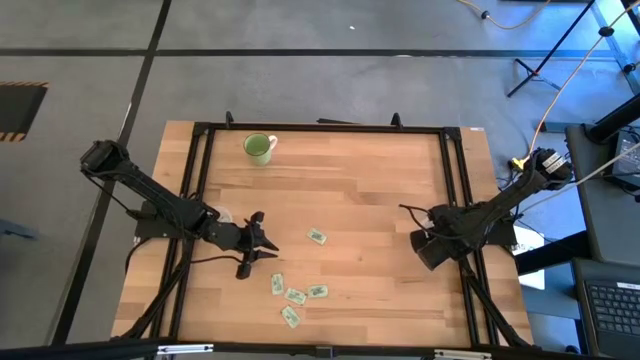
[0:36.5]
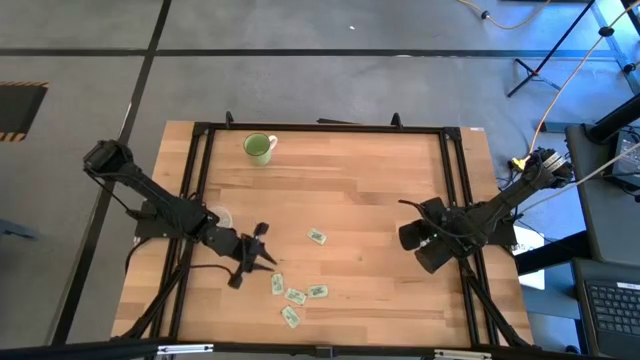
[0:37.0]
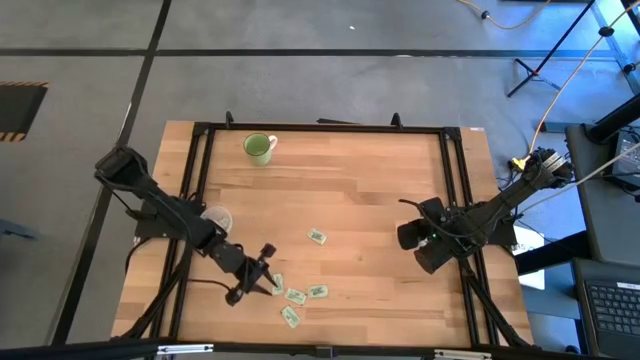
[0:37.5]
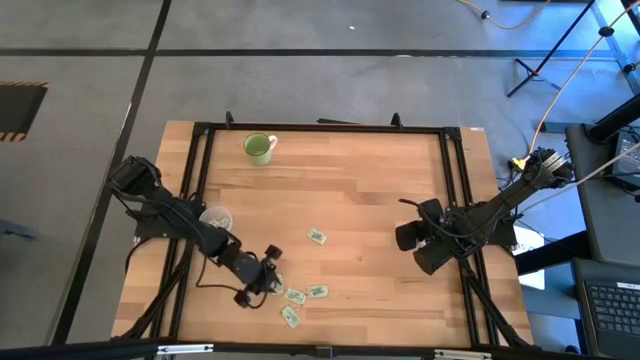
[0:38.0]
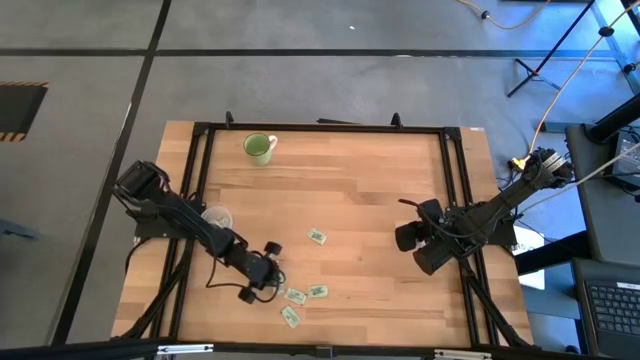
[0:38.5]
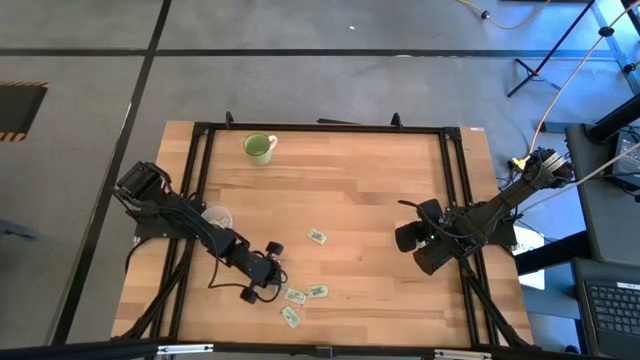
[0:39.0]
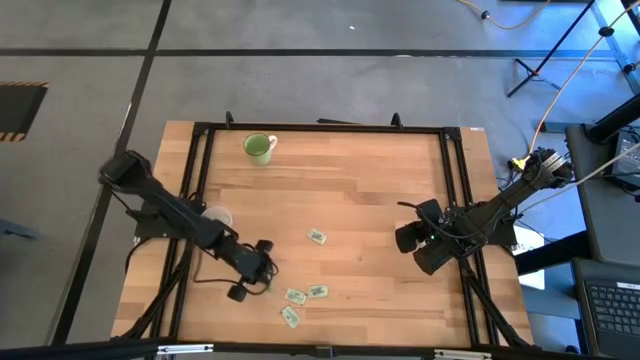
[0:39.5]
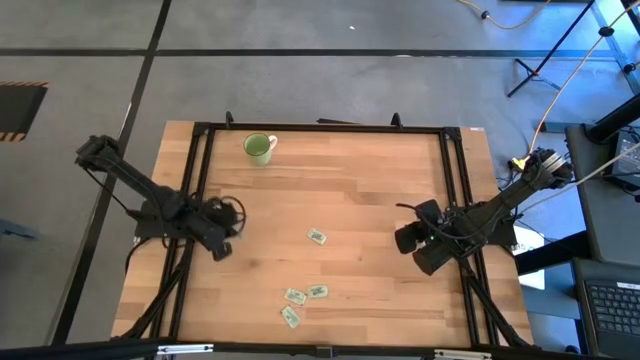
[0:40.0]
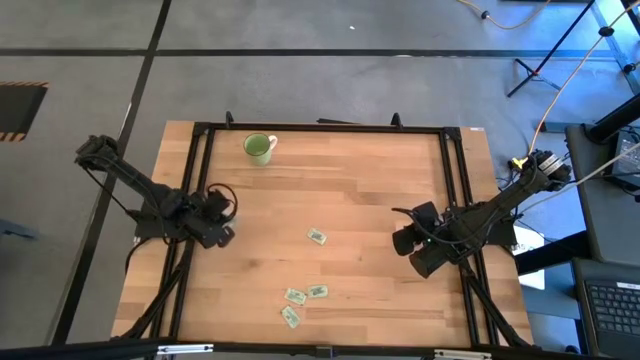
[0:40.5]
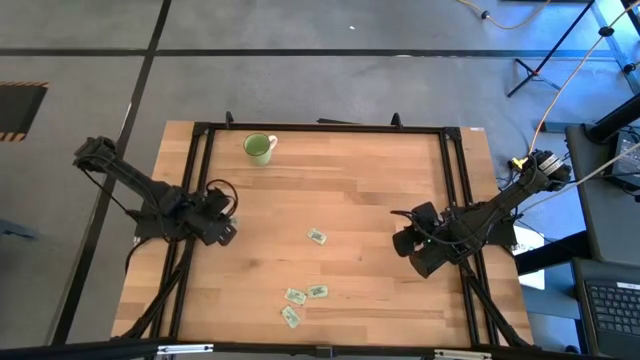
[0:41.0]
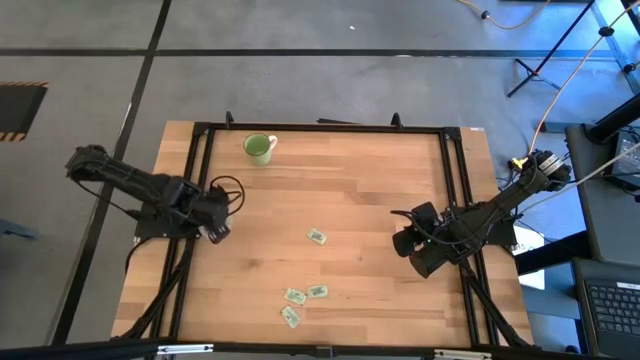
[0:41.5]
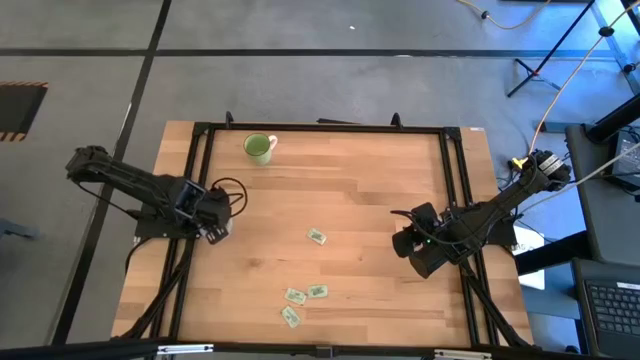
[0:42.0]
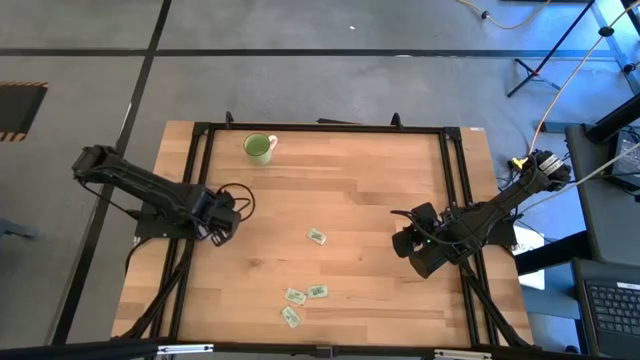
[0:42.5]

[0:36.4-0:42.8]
Task: Pick and place items into bin
Put the white stevia packet into the left transparent bin

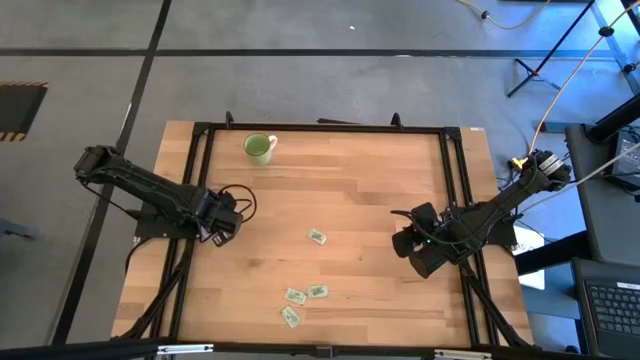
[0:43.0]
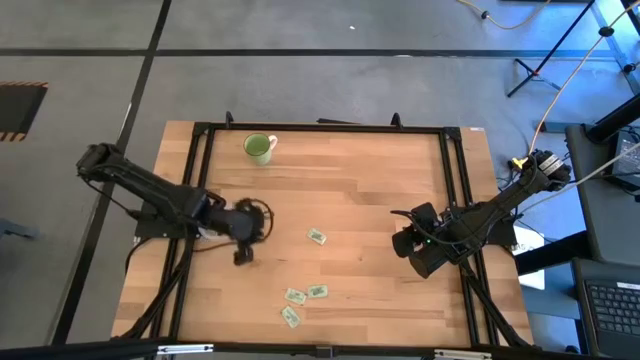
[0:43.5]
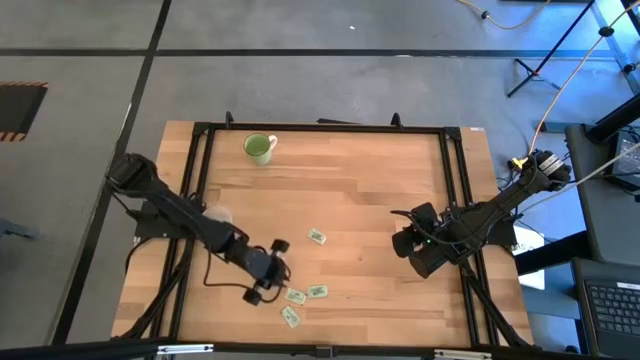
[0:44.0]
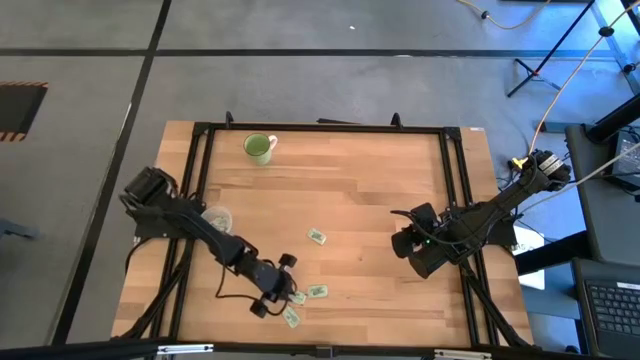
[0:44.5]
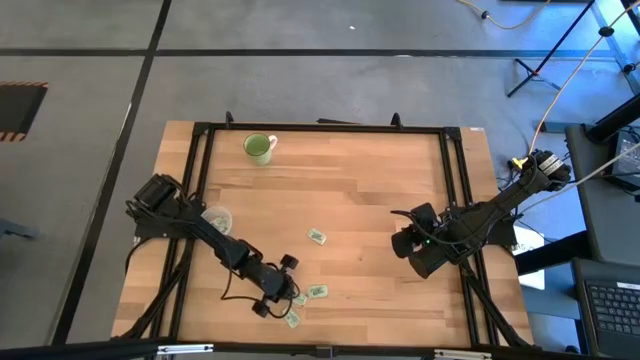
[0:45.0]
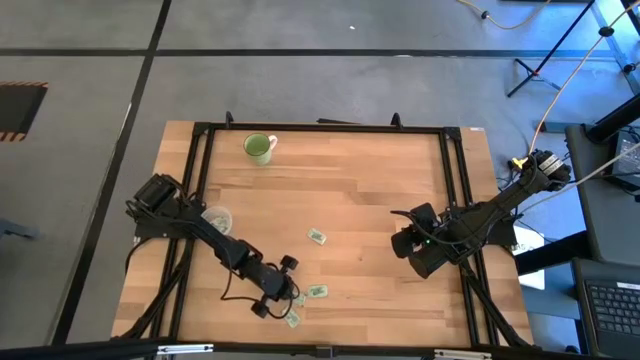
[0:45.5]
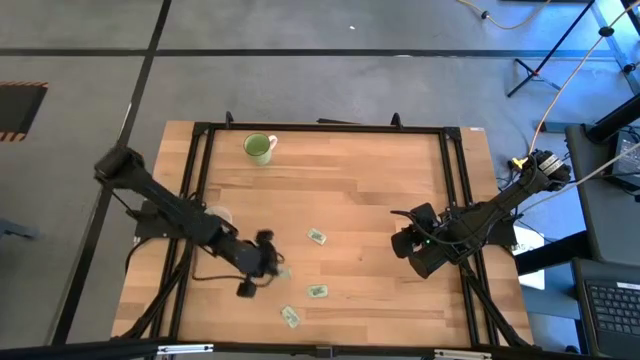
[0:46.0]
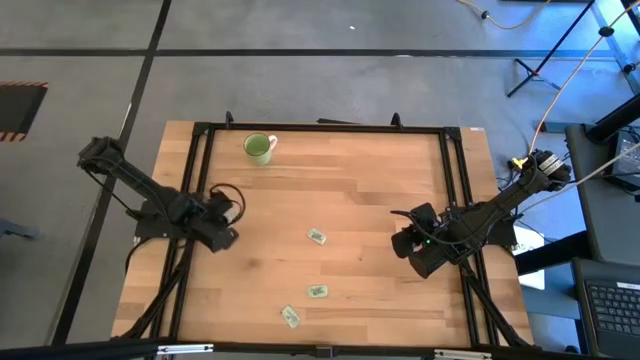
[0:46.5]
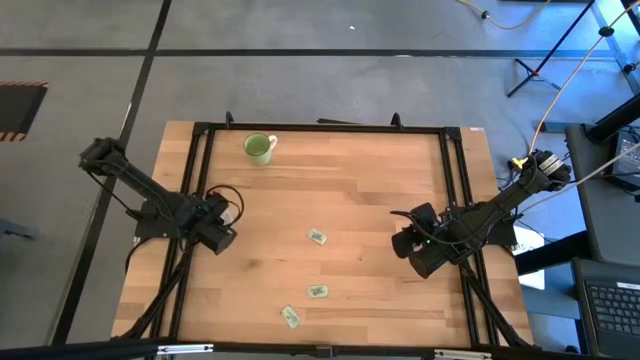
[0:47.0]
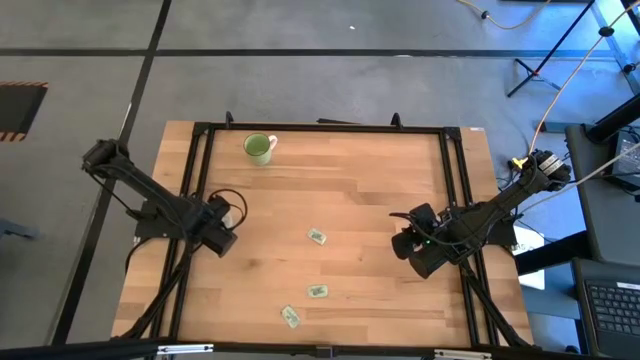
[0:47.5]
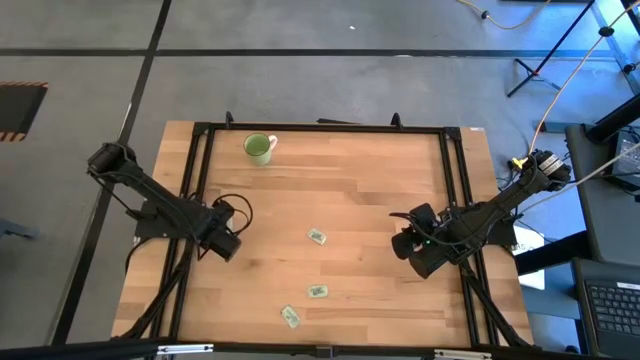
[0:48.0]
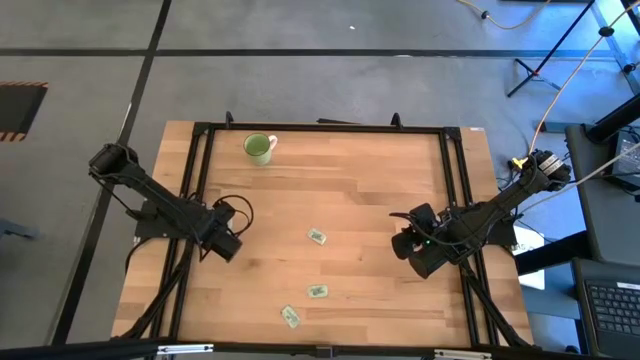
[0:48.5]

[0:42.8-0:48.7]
Put the white stevia packet into the left transparent bin

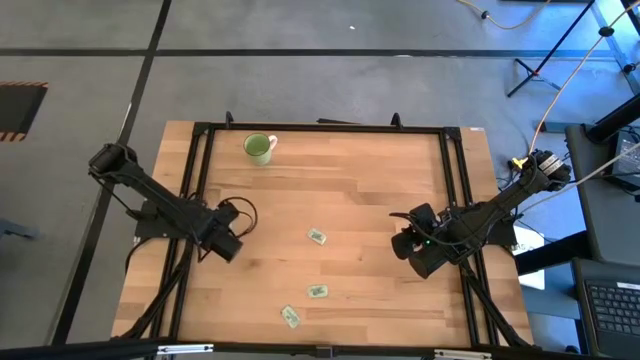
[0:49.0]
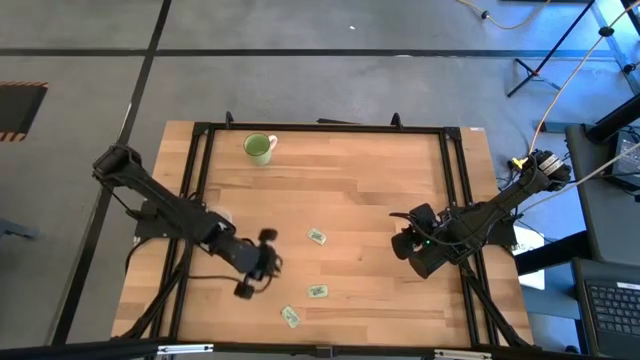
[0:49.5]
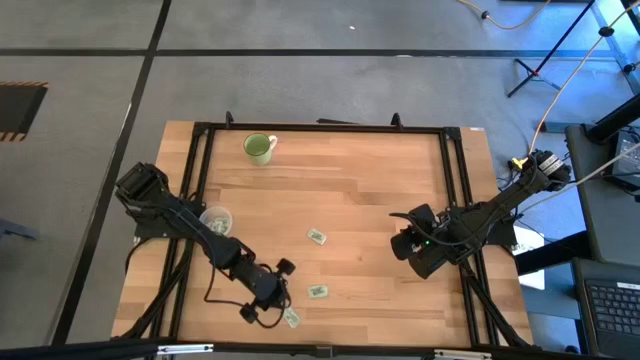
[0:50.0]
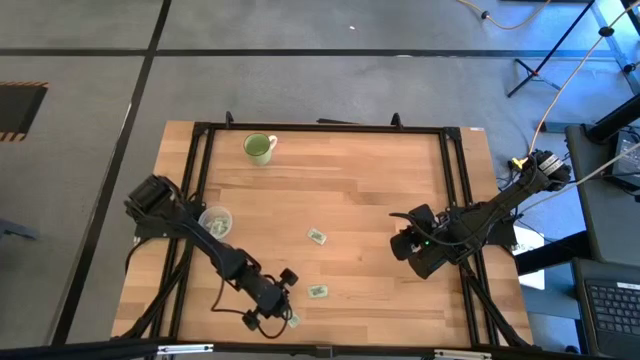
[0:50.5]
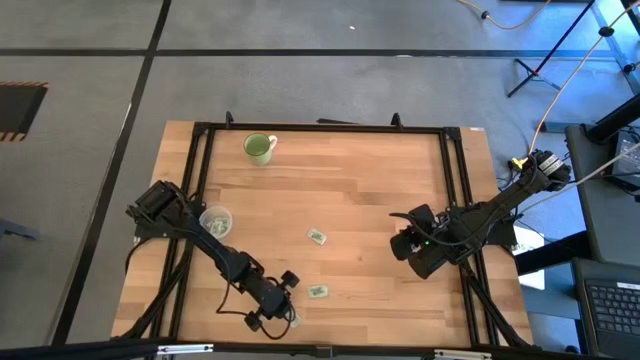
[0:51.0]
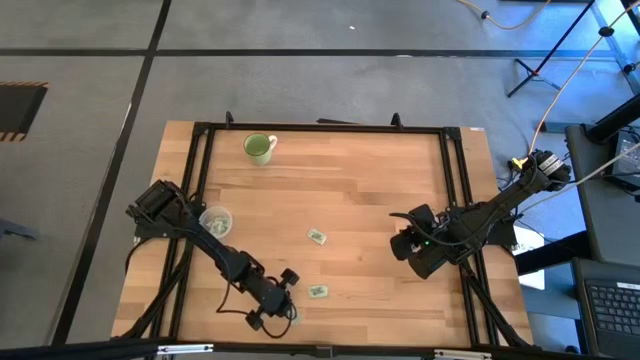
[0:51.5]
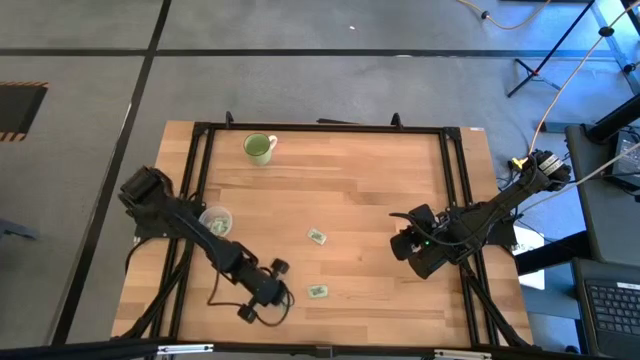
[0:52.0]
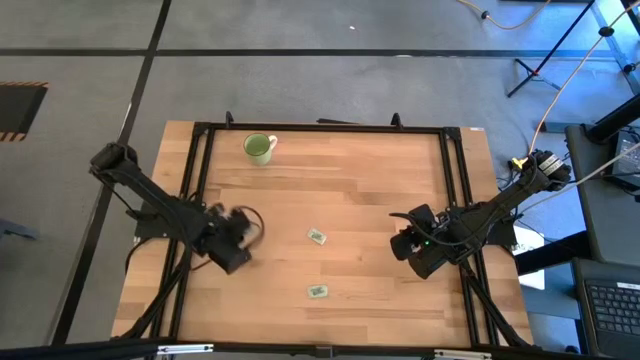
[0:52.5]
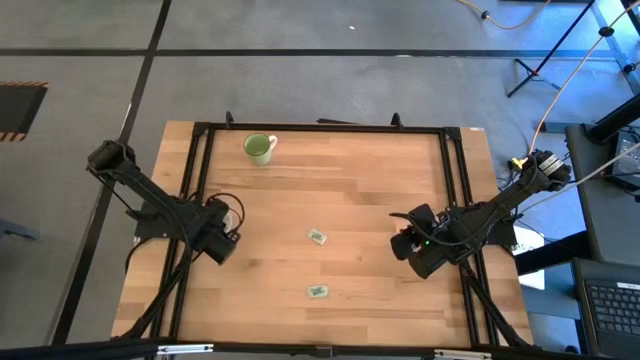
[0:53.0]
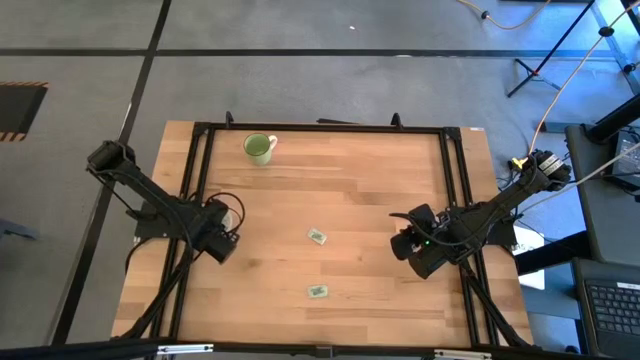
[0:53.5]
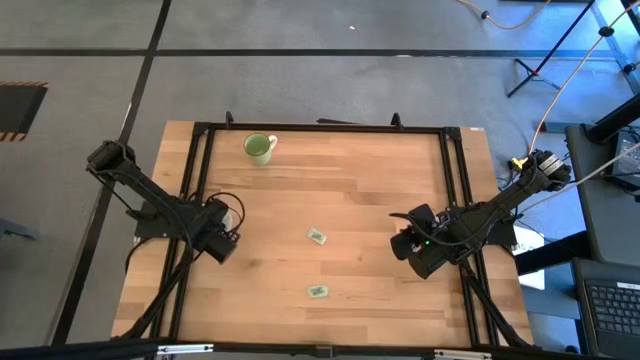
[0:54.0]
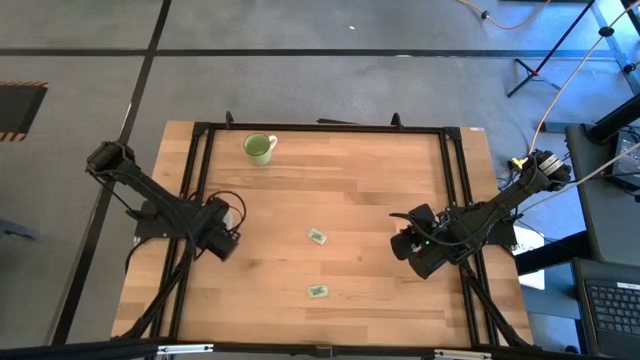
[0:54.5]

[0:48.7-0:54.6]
Put the white stevia packet into the left transparent bin

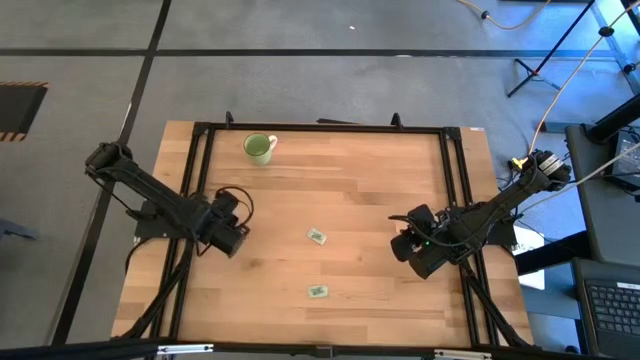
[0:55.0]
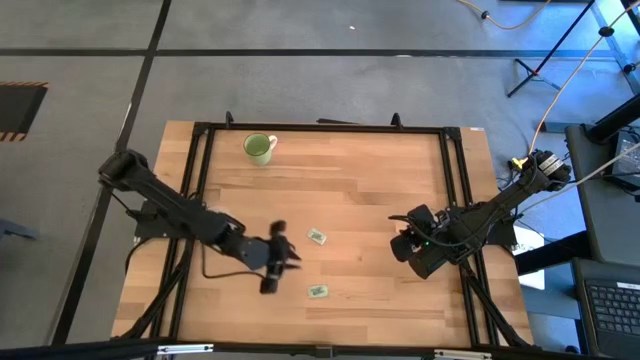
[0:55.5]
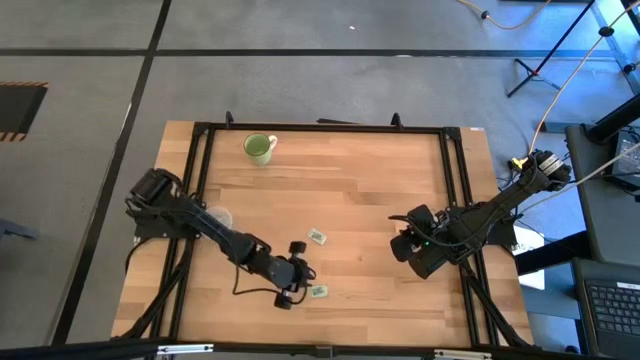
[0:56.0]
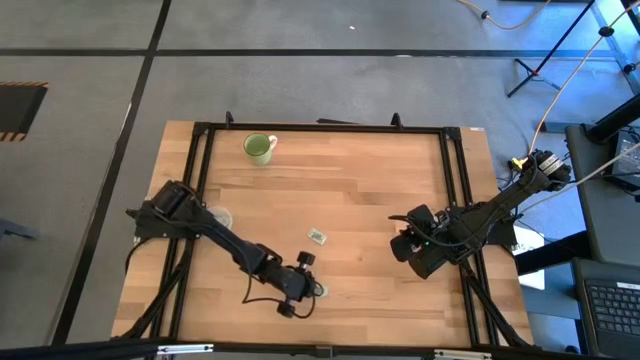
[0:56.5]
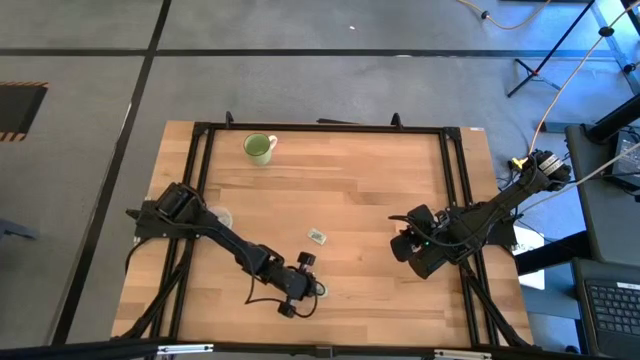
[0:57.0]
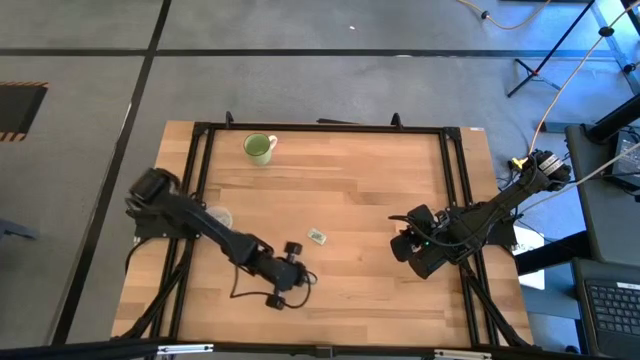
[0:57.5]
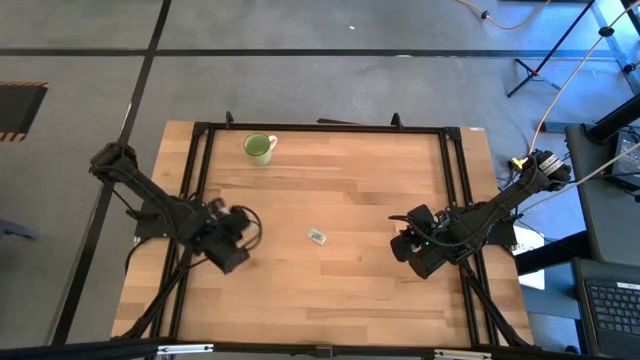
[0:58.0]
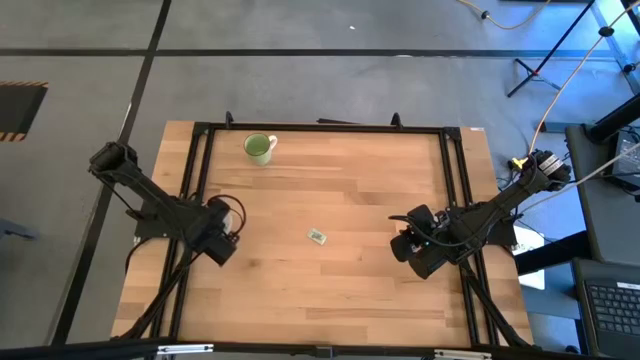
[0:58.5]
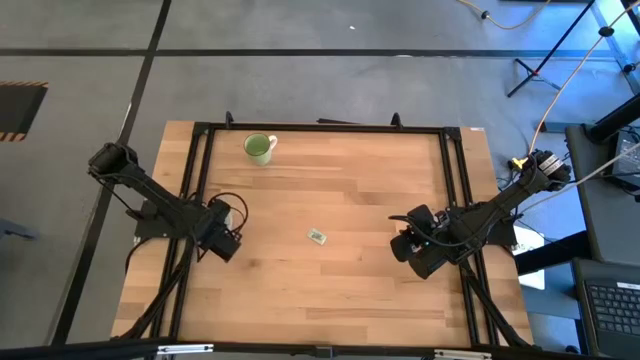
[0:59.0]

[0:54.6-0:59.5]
Put the white stevia packet into the left transparent bin
